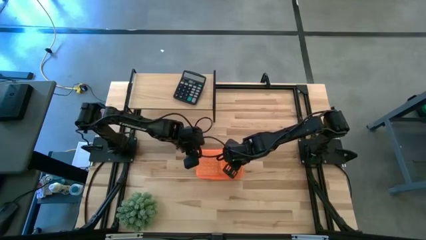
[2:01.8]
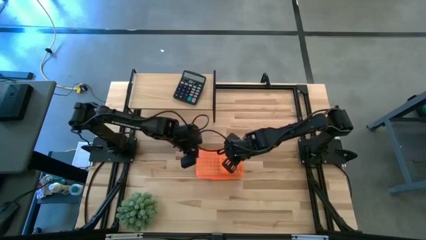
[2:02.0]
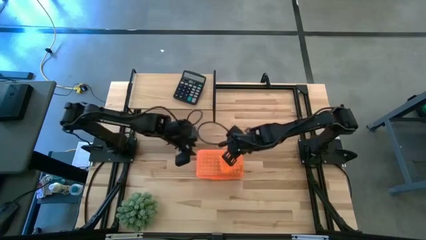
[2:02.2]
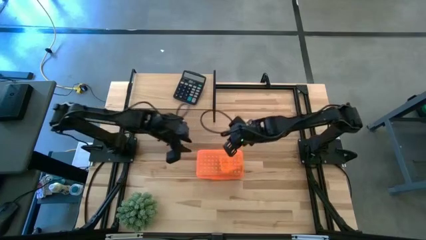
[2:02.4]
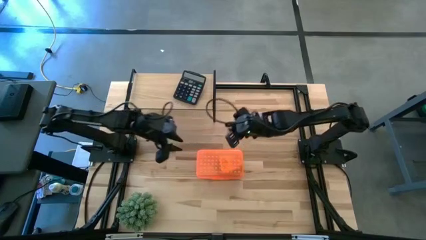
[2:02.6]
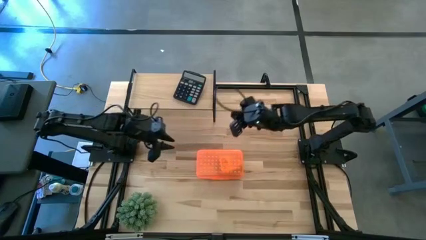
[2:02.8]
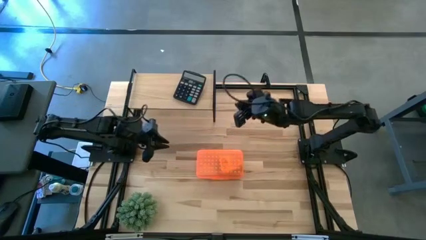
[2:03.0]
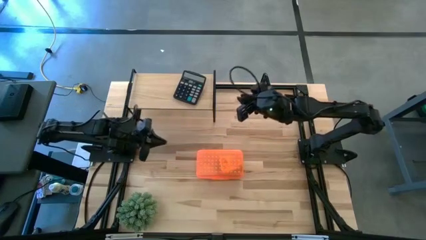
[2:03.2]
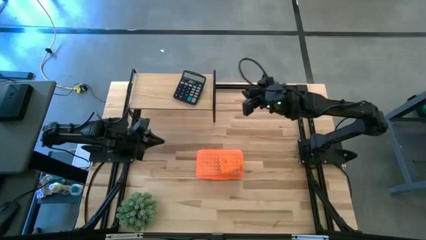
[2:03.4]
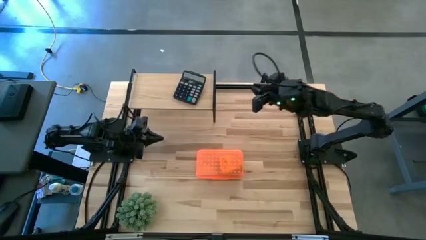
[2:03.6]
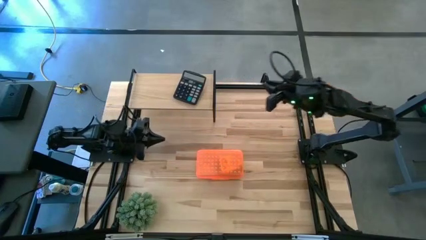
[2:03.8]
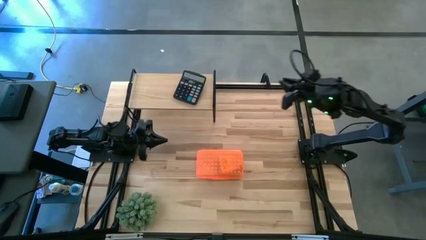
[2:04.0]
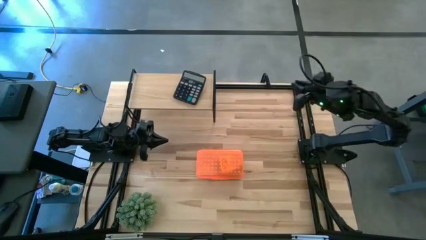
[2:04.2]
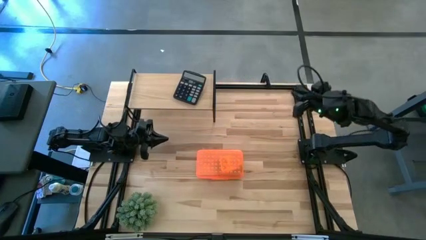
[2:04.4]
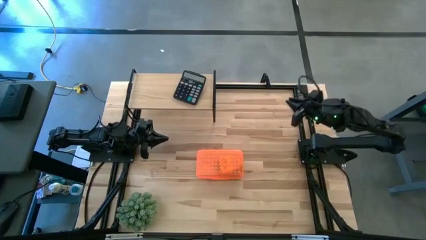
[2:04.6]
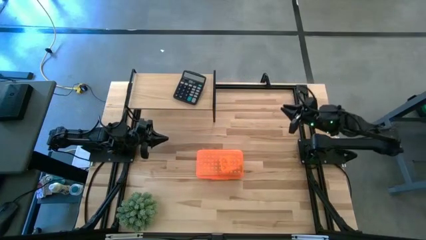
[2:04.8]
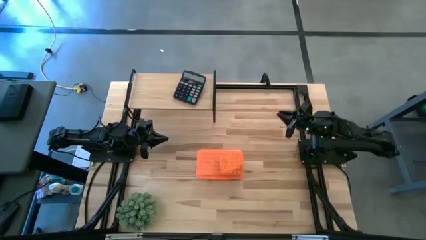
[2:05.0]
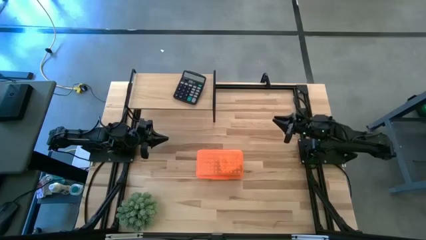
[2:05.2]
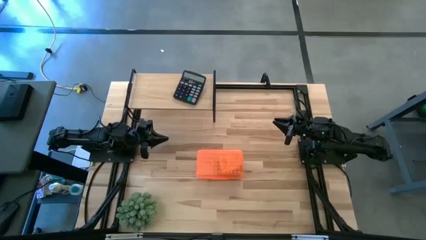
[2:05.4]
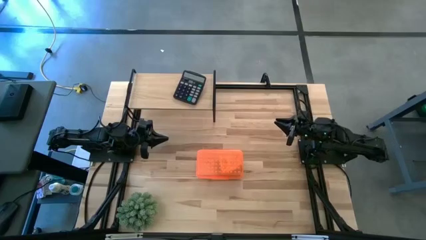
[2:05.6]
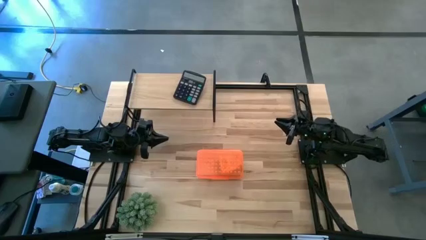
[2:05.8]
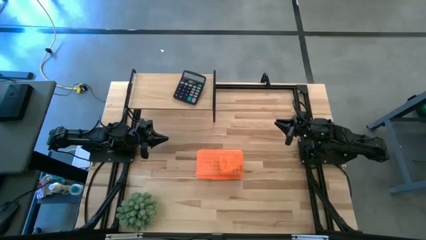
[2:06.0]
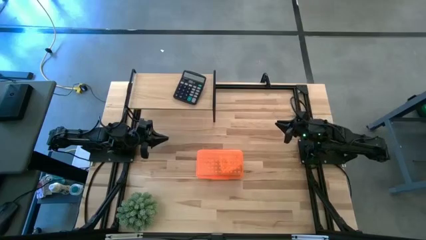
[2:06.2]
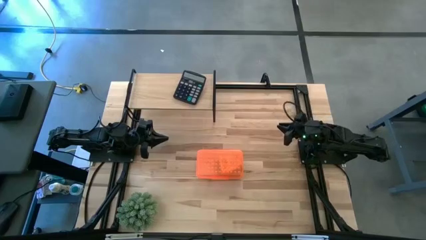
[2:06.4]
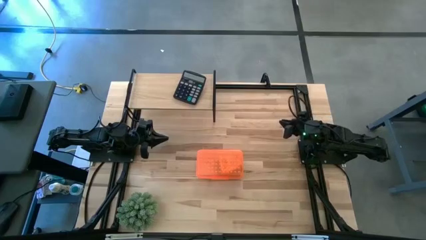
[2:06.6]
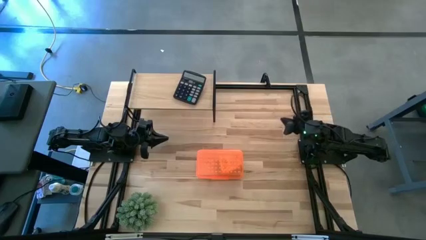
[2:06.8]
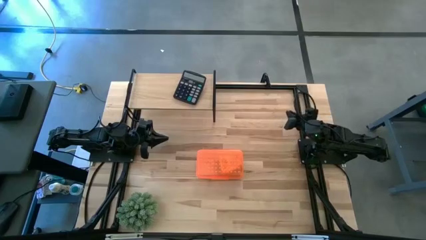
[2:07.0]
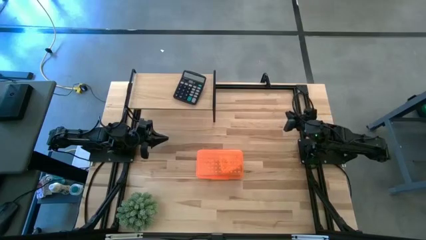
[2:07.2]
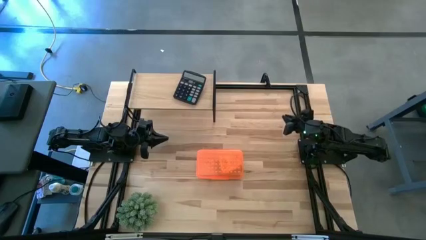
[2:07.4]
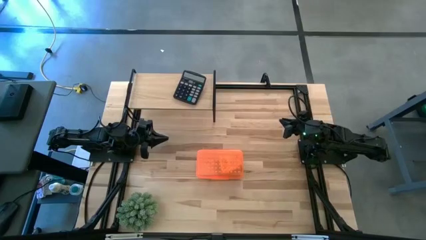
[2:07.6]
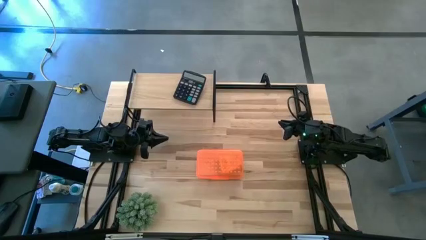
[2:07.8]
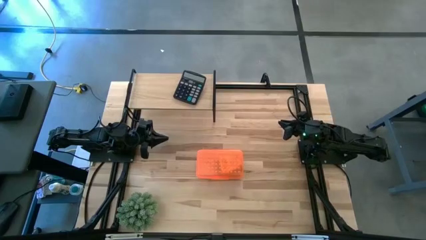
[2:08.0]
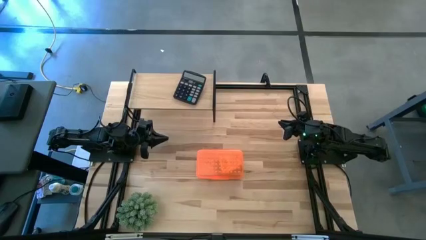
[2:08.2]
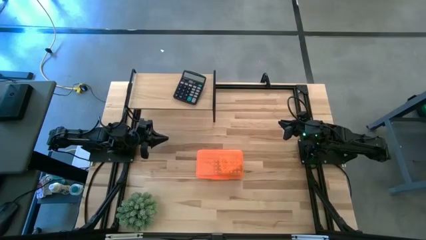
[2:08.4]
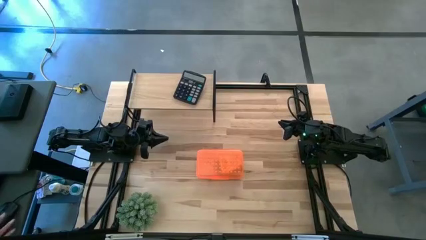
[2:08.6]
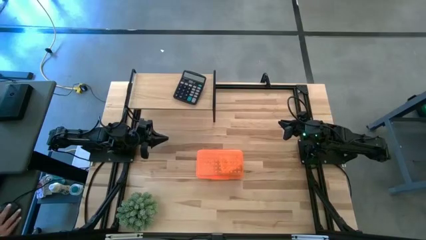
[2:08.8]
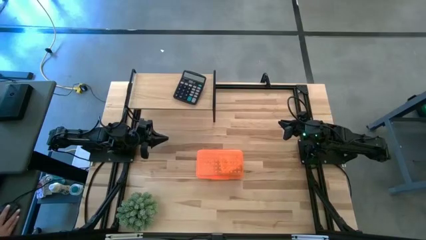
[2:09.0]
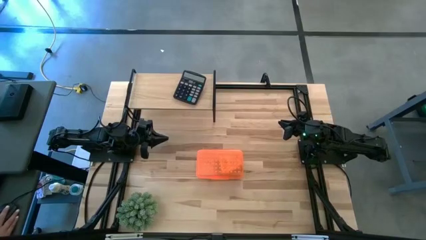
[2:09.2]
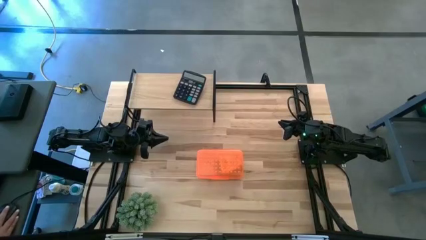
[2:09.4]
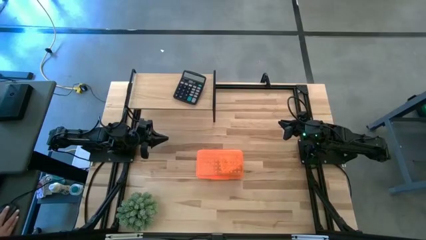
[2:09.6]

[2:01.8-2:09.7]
Task: Pack school essentials
Return to Home Position

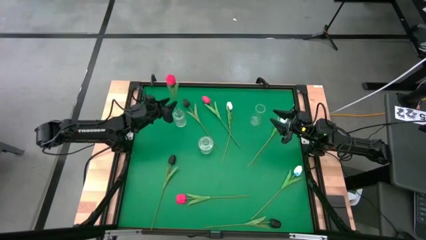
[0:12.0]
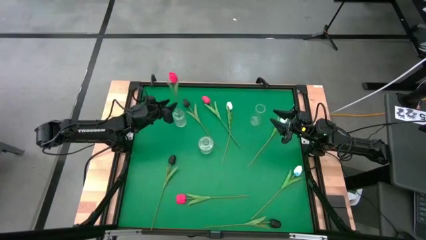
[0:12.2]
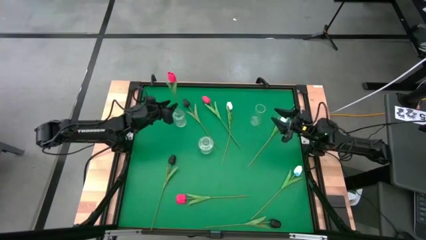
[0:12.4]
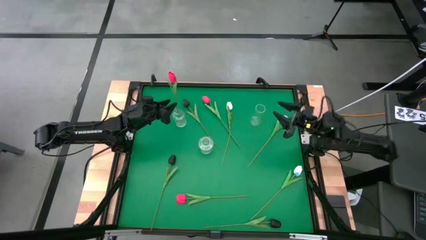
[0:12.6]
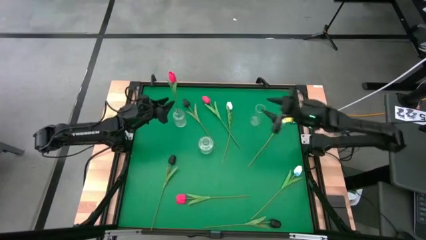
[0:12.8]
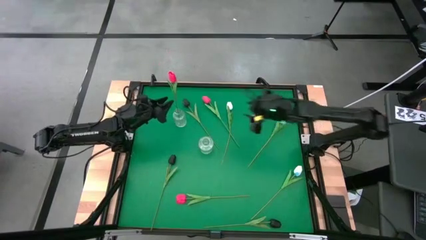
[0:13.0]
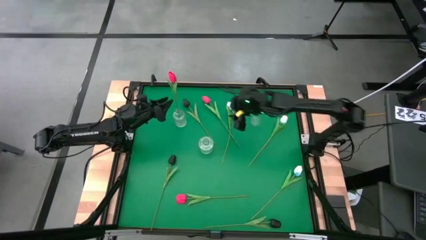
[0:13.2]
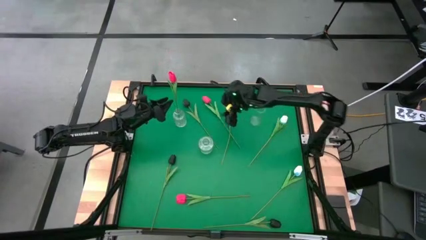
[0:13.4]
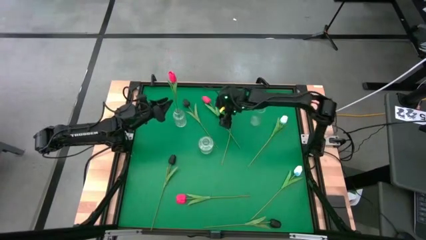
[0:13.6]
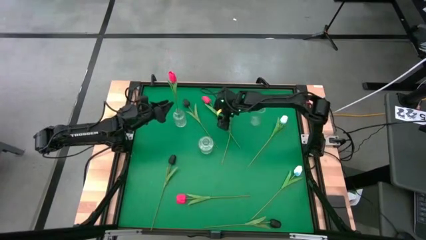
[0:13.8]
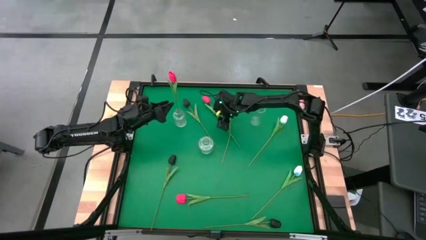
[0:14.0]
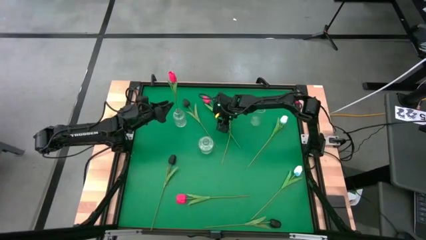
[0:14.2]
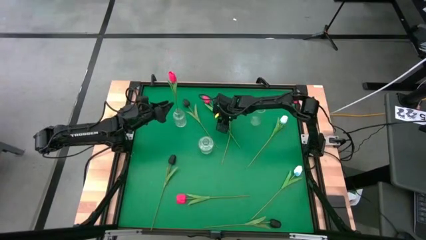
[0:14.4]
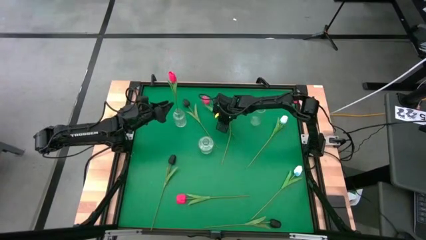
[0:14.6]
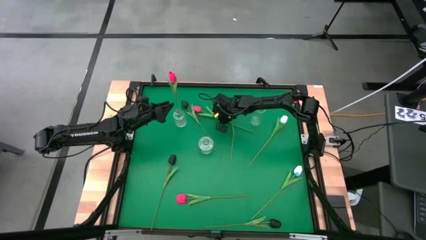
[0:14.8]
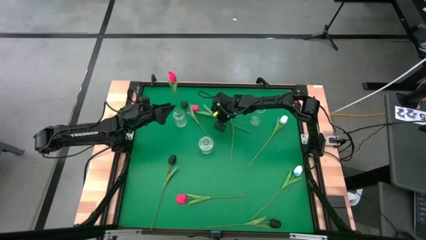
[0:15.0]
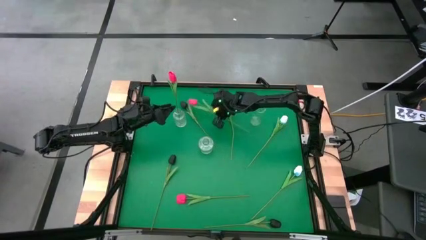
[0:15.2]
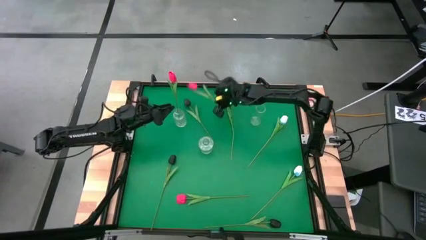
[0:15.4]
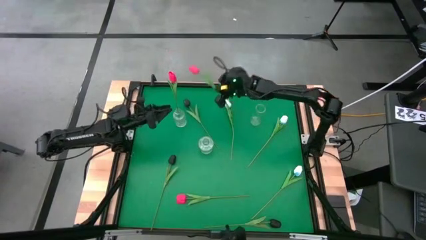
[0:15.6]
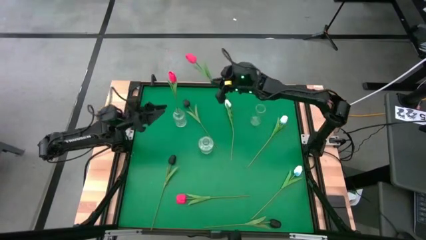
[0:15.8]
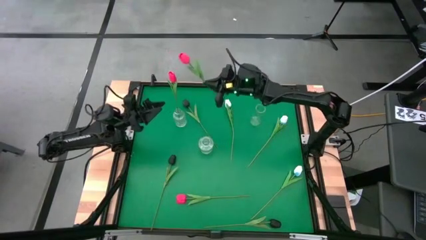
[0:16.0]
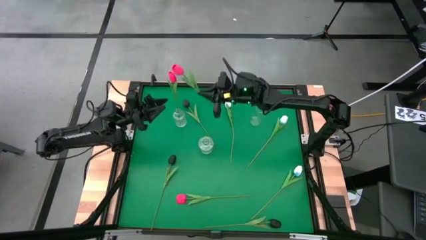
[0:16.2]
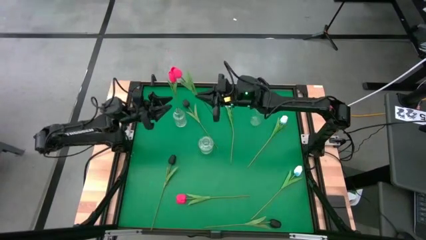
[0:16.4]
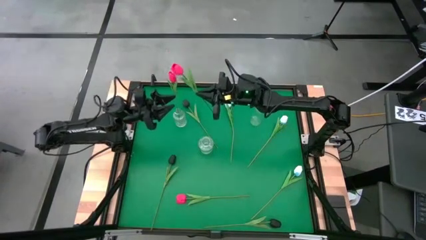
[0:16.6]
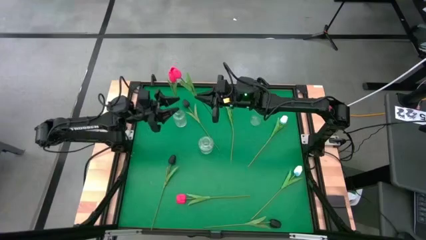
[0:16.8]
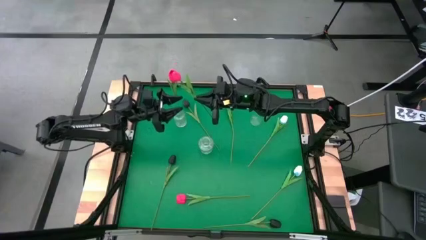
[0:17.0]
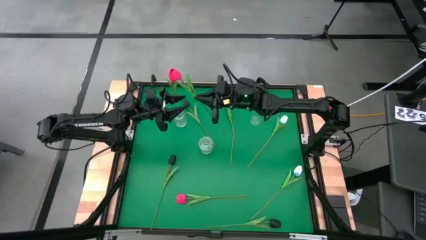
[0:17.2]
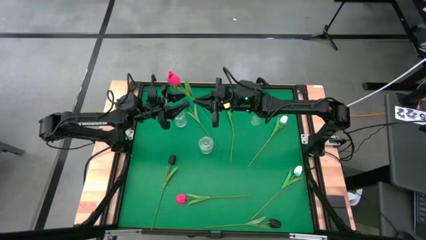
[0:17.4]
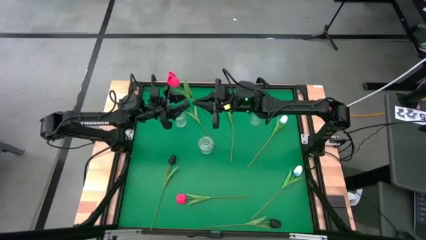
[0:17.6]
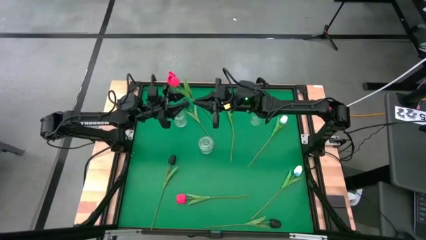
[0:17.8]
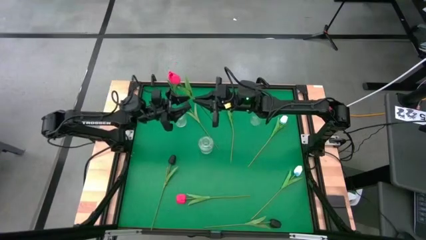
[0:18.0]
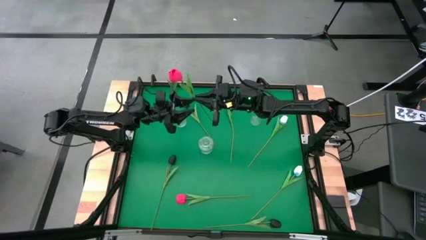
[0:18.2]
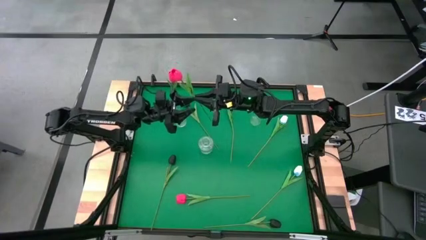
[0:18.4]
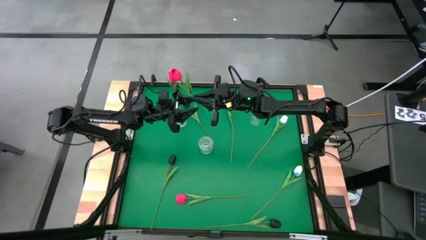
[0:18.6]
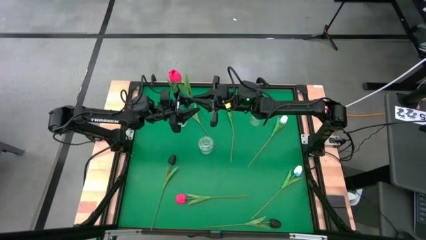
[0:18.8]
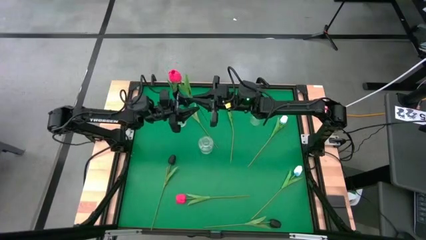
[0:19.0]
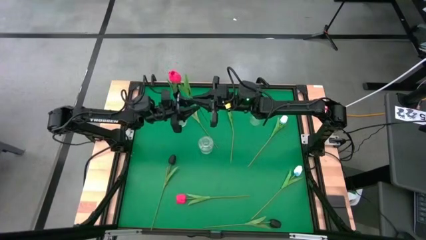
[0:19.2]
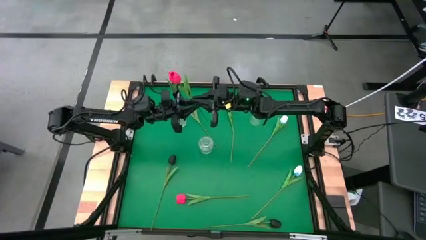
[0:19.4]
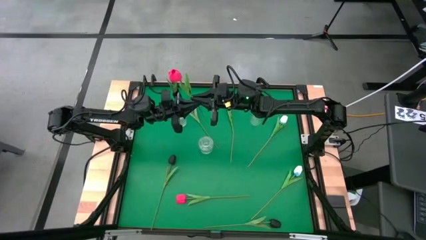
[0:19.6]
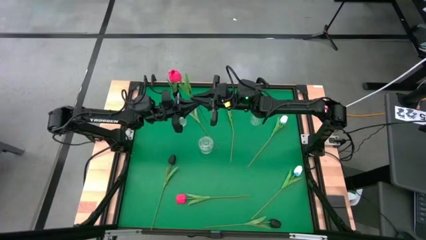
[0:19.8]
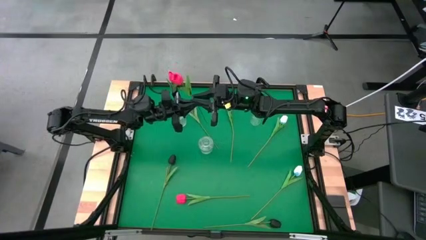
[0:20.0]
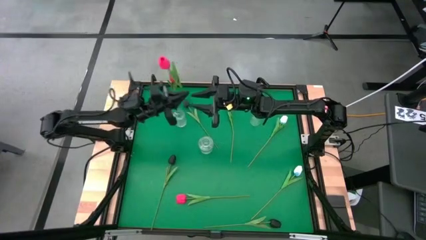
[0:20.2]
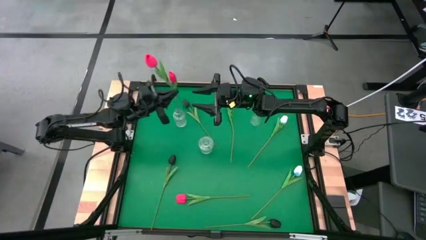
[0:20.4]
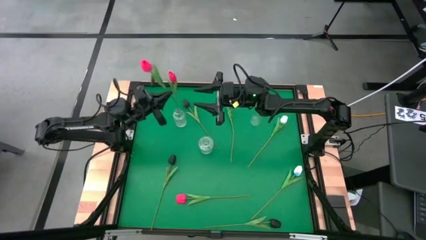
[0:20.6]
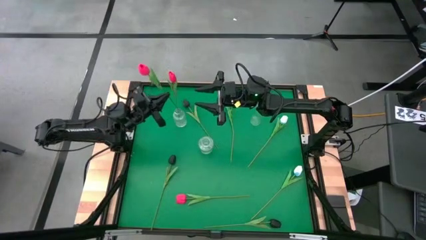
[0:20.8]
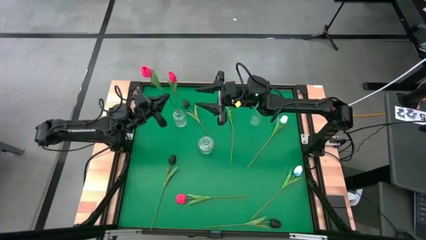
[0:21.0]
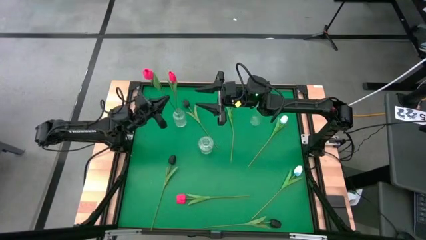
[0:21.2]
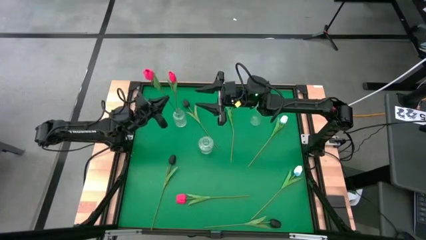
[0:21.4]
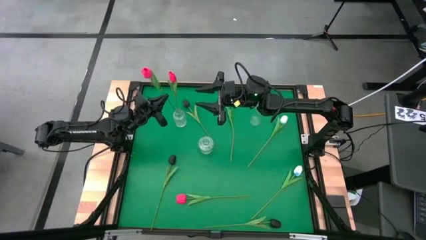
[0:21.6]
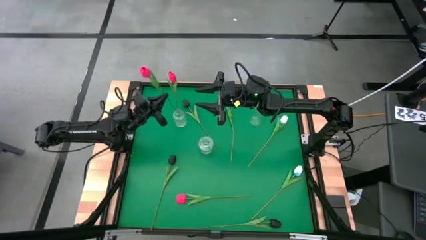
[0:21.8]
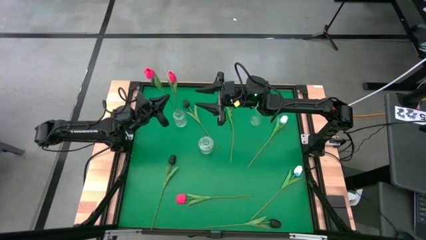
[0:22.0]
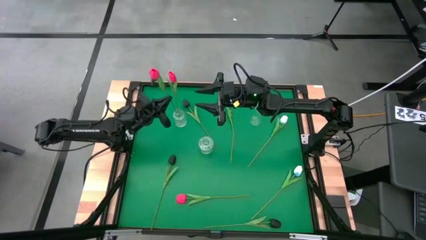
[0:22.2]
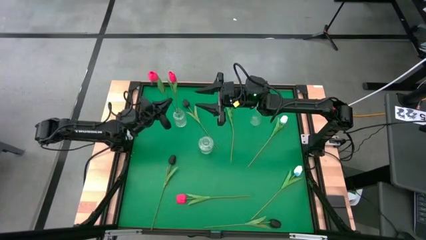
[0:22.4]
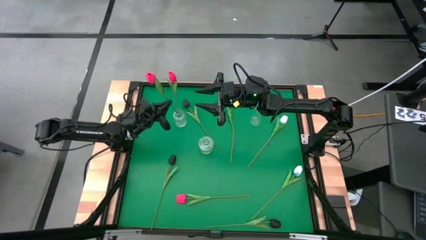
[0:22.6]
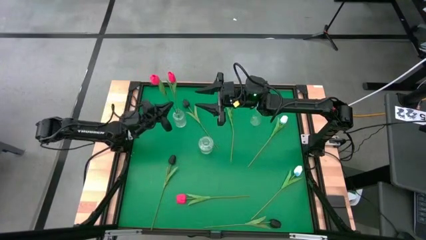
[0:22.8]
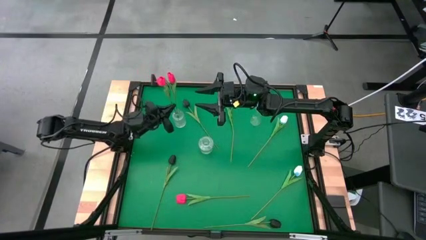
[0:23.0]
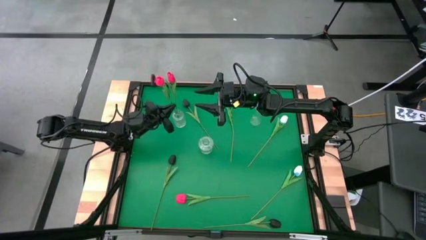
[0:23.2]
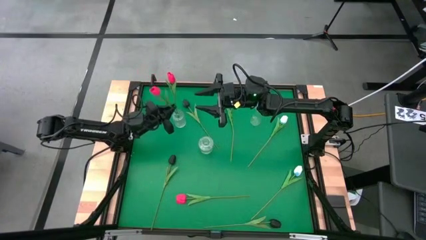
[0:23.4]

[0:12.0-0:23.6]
Task: Sort flowers into vase by color
Put the top pink tulip into the top left transparent vase
